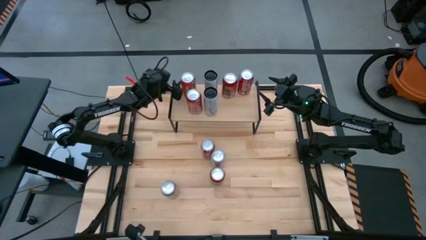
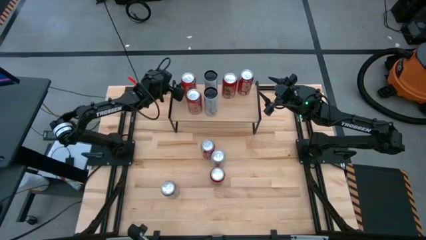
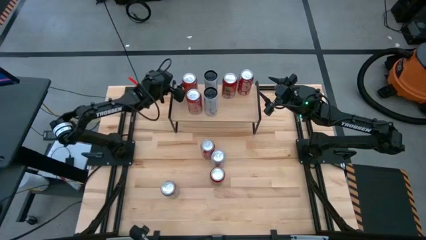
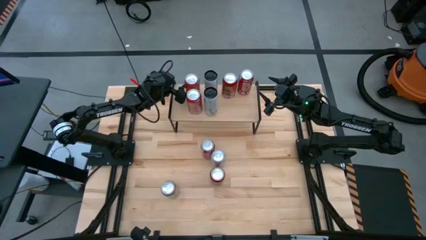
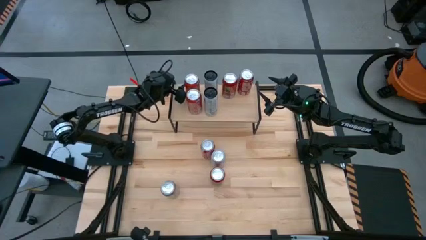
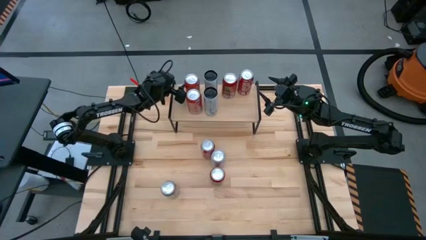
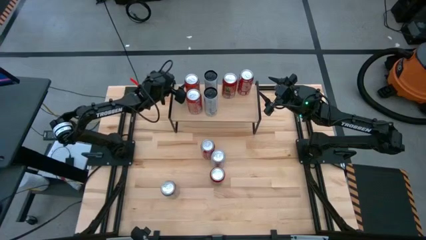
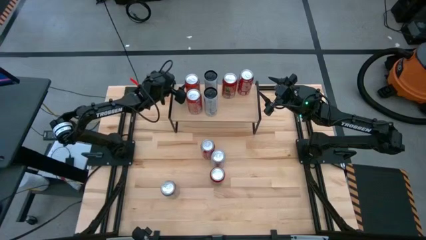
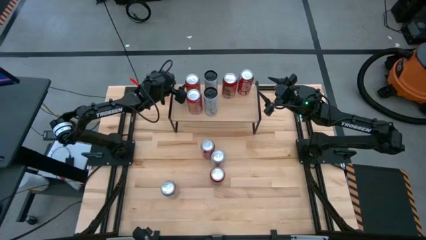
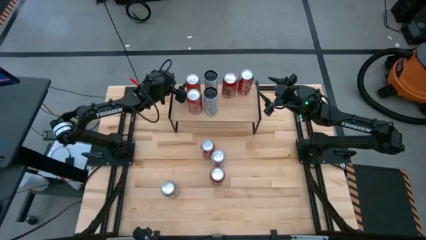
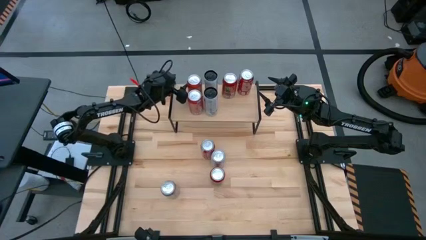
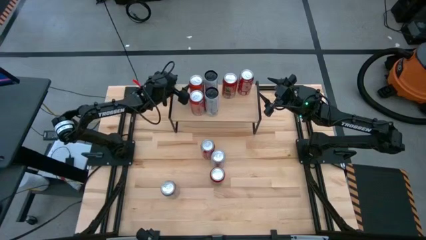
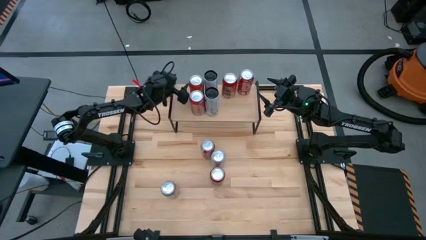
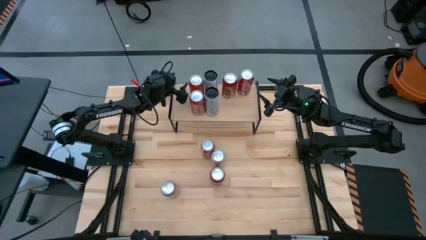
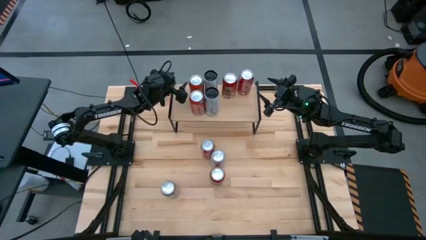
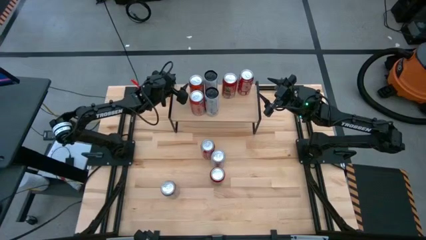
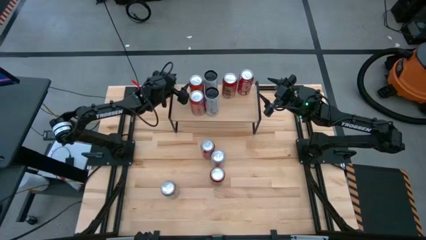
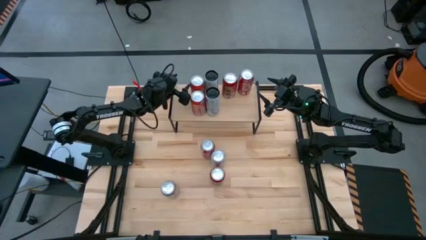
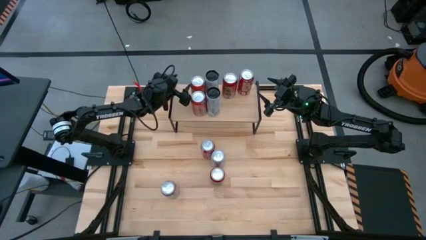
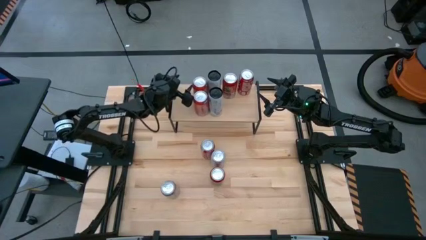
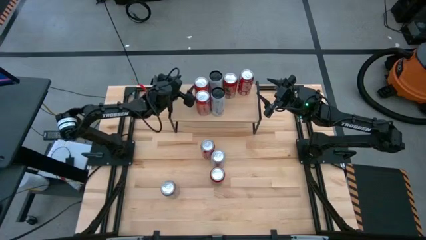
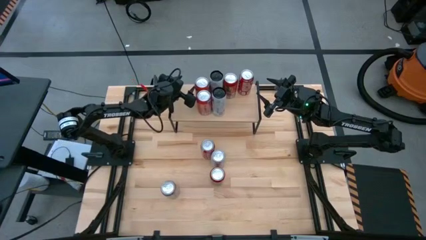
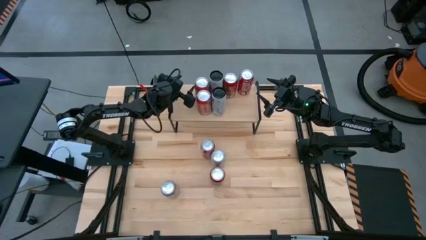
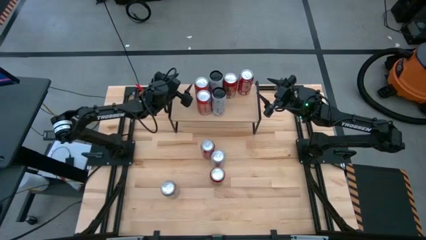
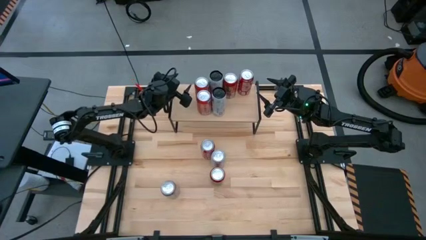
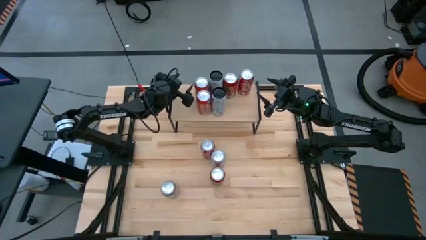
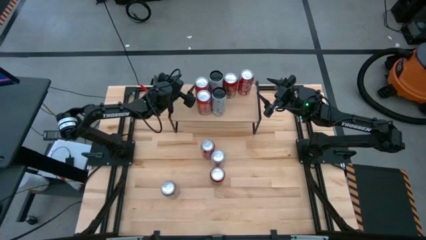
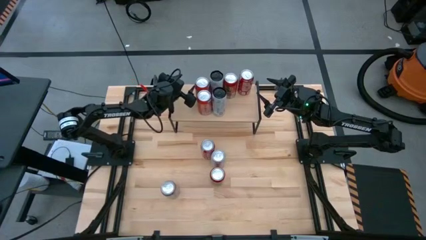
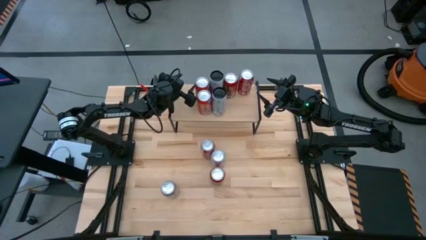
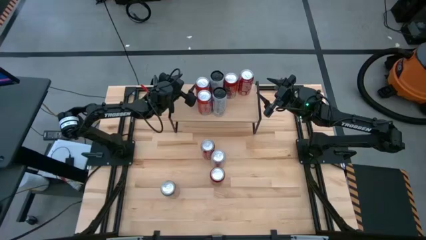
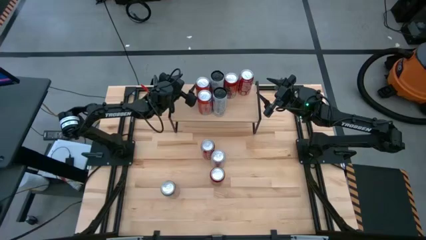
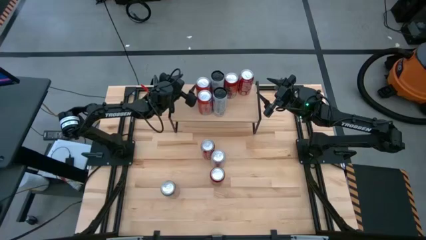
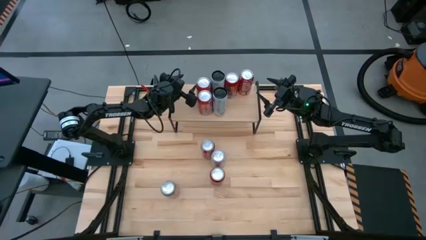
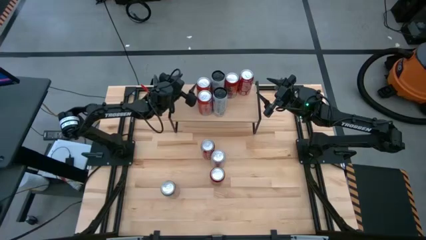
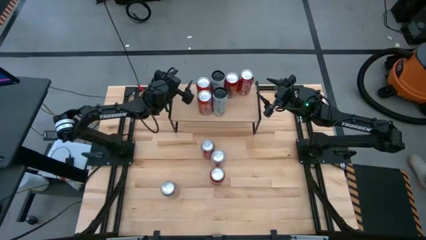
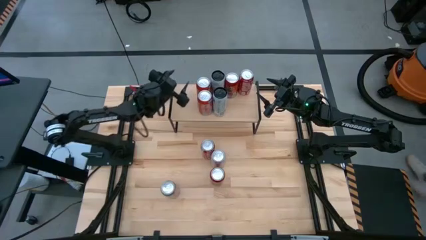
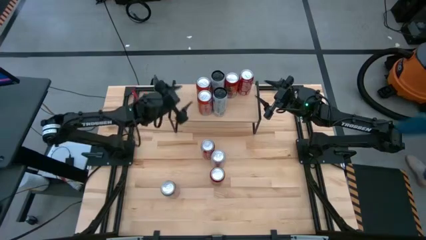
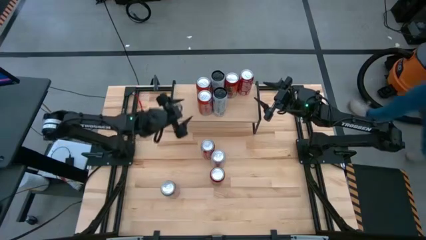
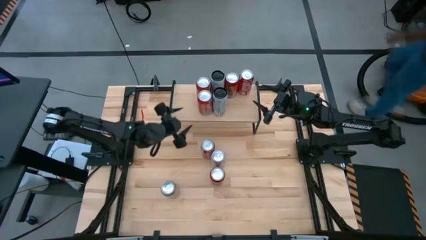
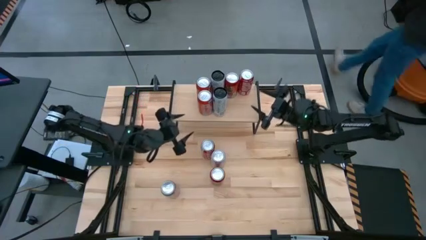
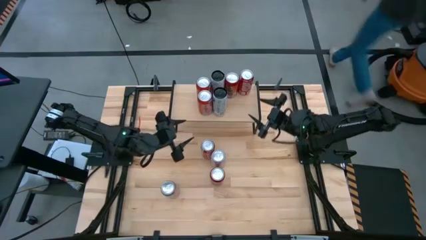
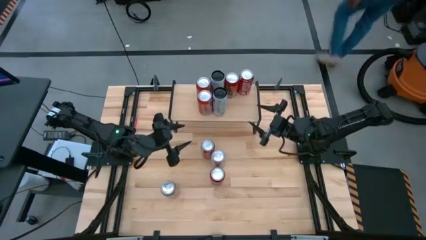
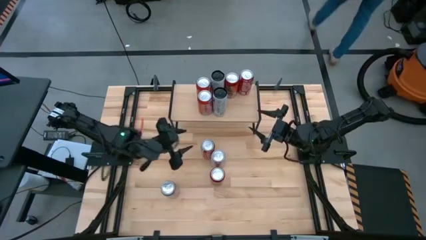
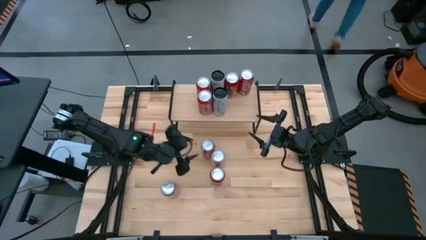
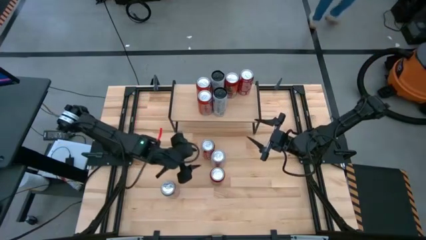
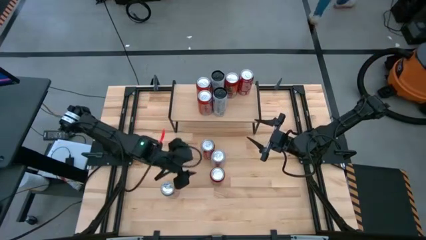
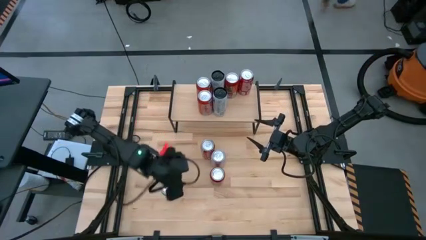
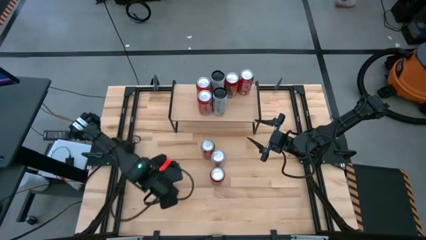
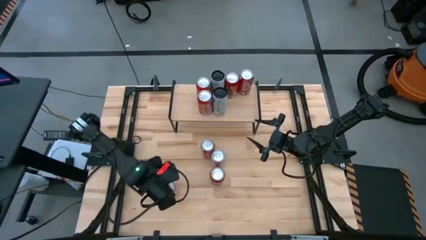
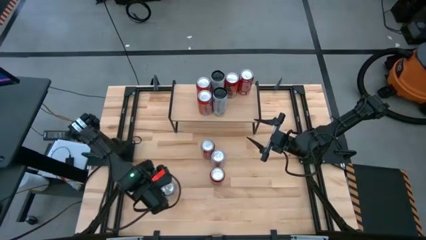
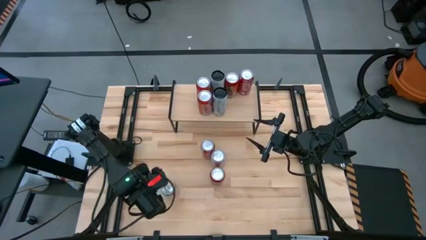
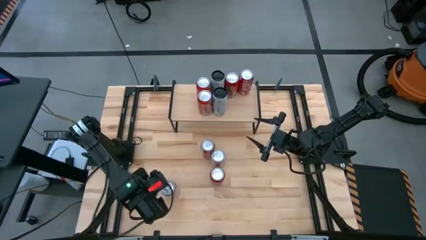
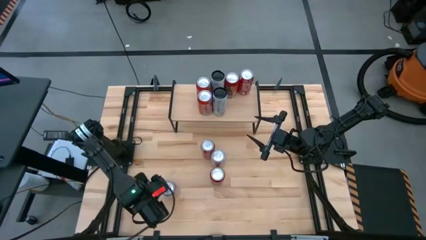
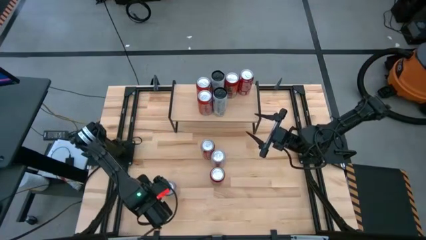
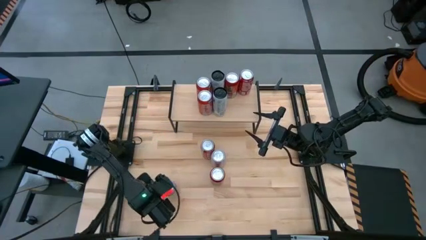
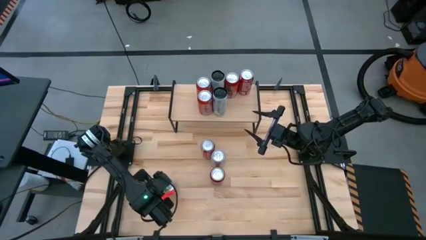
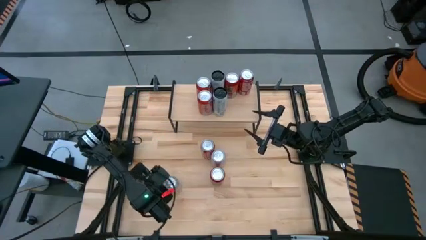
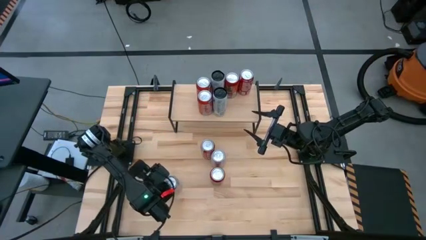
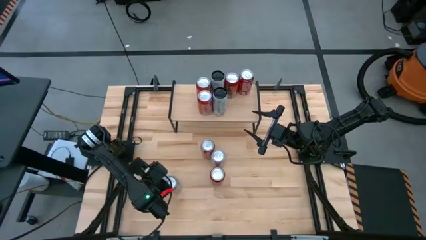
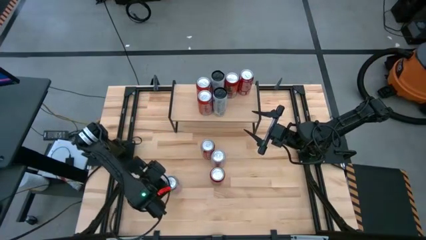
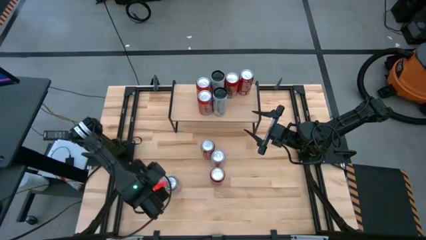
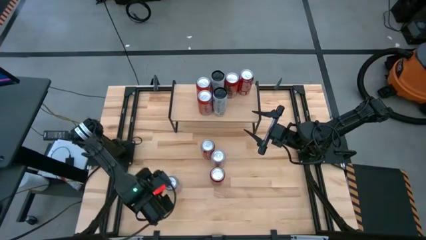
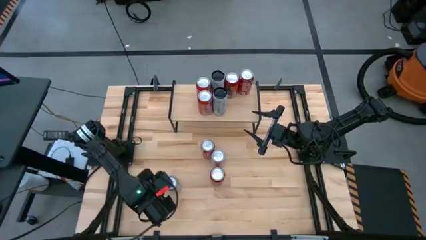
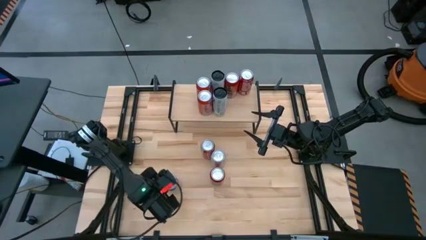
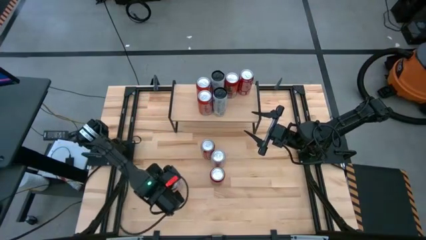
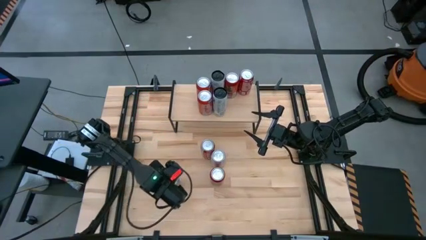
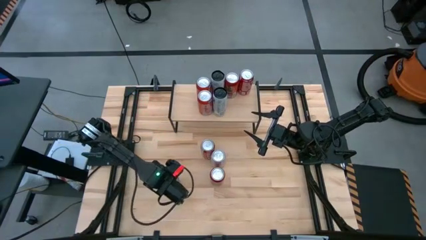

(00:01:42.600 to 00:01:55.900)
Task: Place canned beverage on shelf
Adjust the soda cans

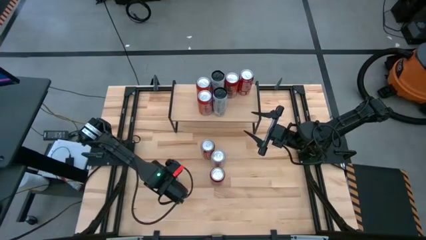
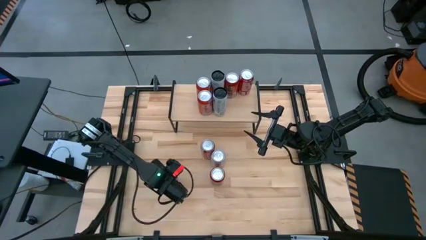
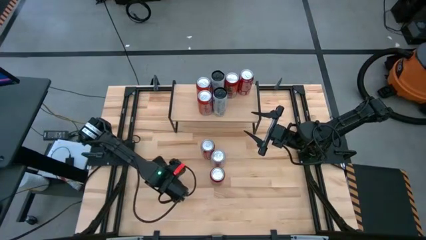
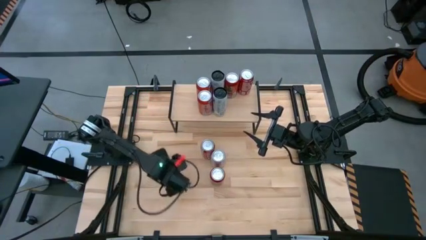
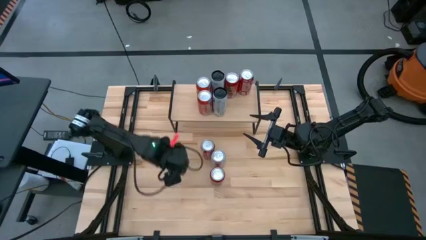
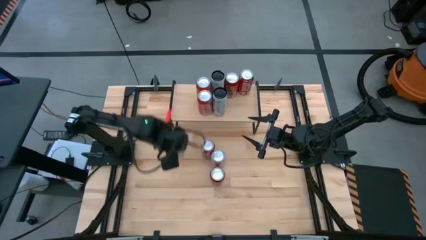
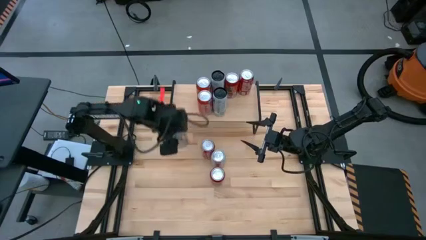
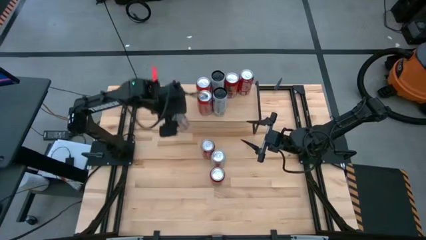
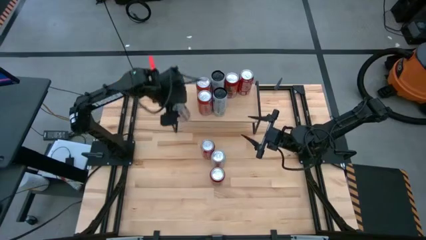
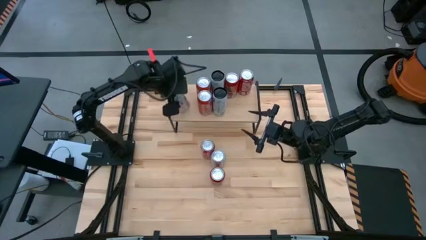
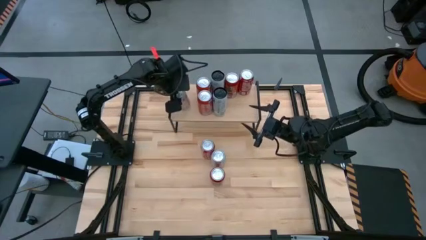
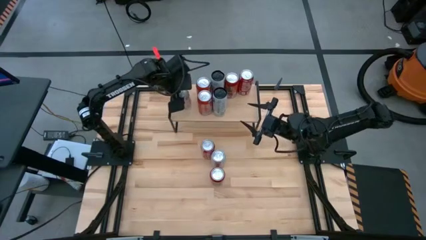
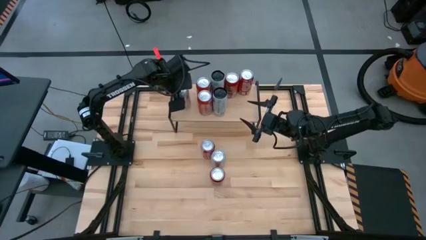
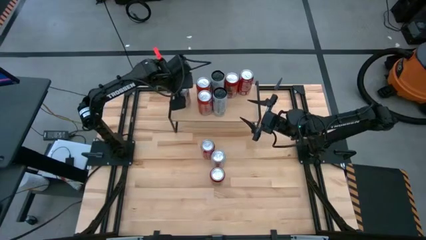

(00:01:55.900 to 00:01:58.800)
Put the white soda can on the shelf
